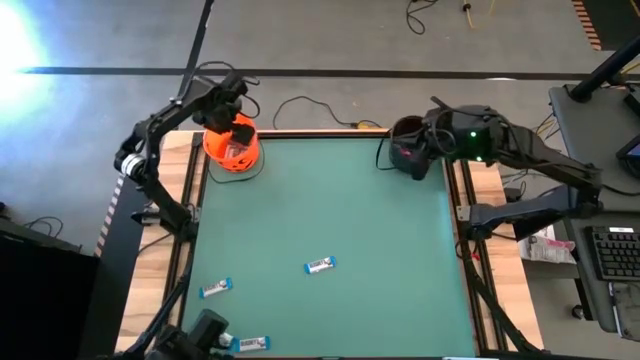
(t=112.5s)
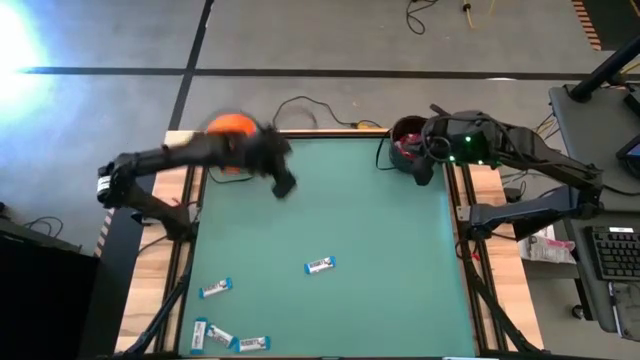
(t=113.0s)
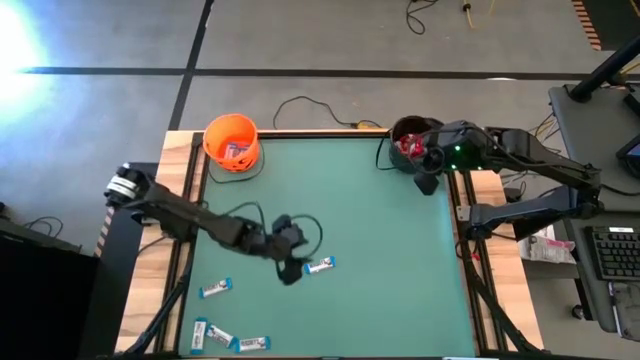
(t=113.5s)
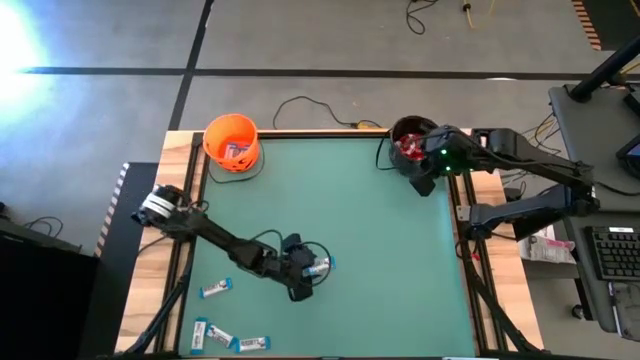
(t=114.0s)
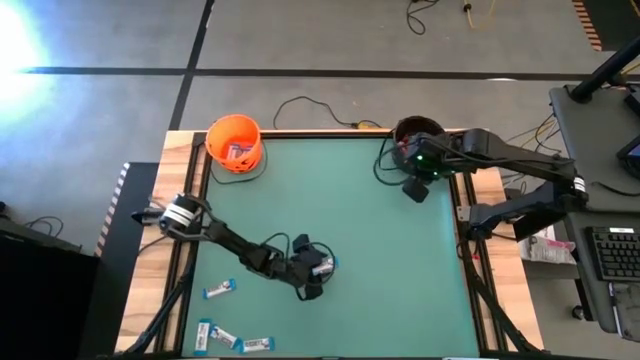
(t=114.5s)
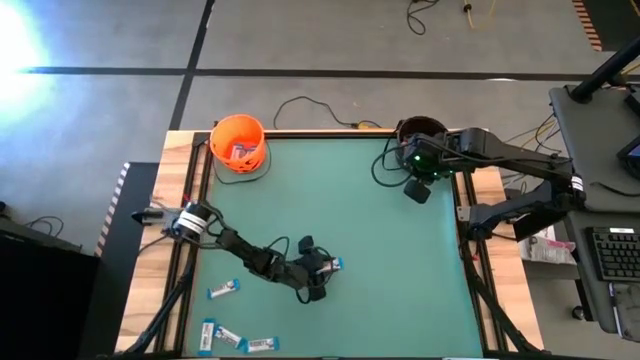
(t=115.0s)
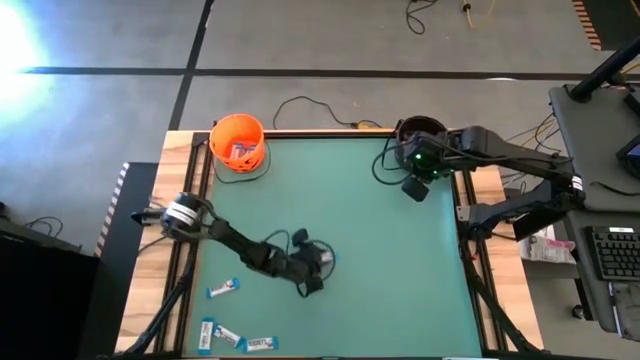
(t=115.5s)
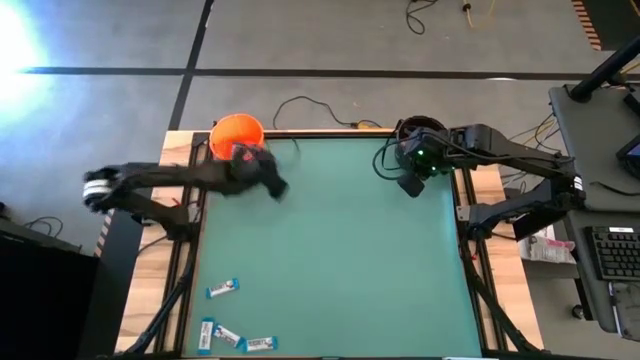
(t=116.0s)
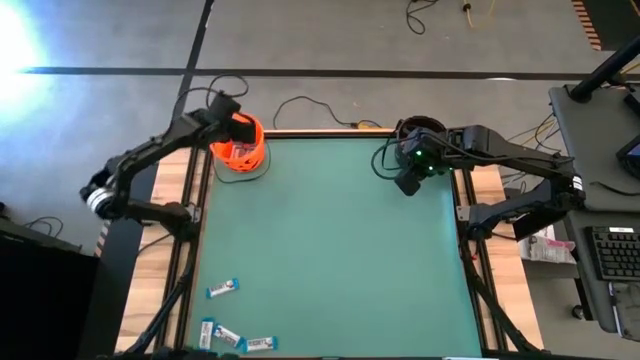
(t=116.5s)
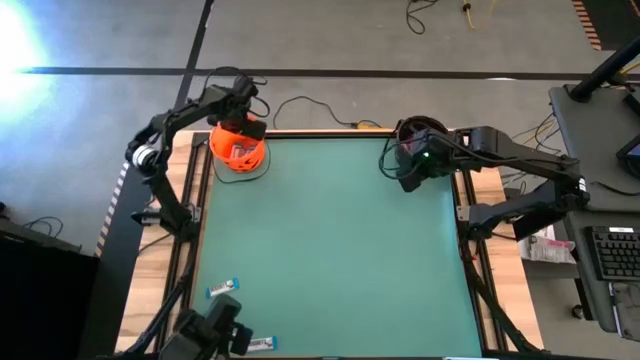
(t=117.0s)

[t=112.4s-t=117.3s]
Task: Sort candy by brand, put in halloween buckets
Put the white chocolate into the orange bucket

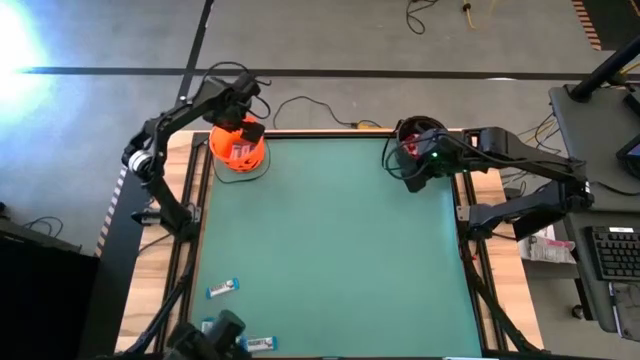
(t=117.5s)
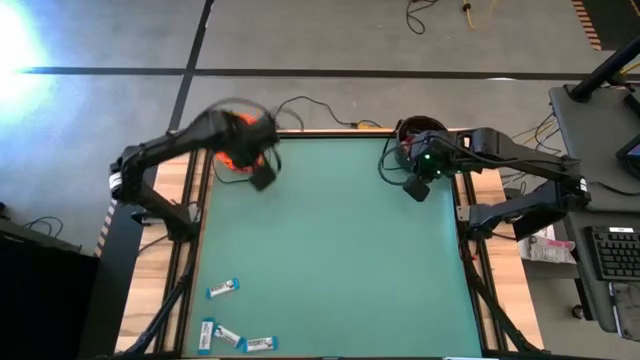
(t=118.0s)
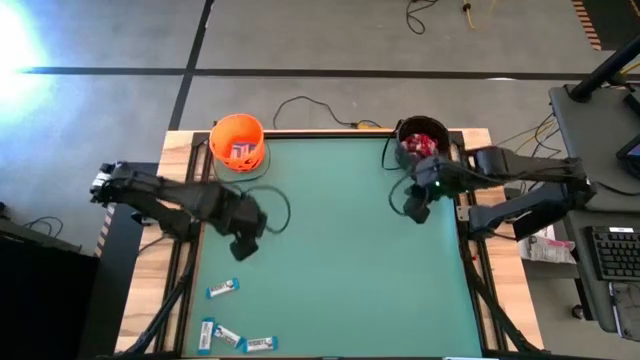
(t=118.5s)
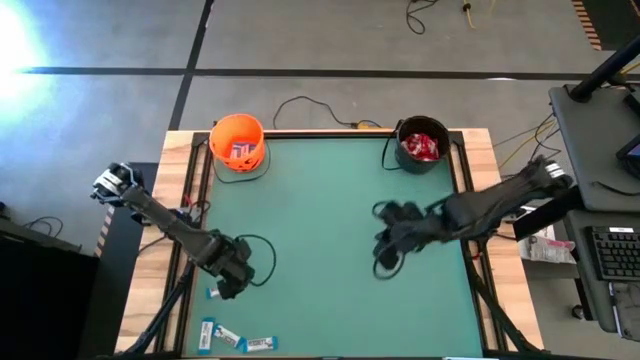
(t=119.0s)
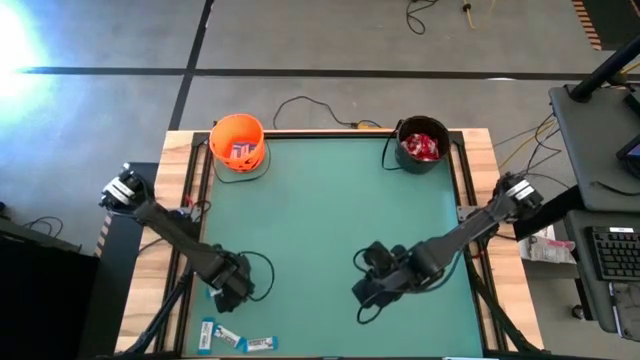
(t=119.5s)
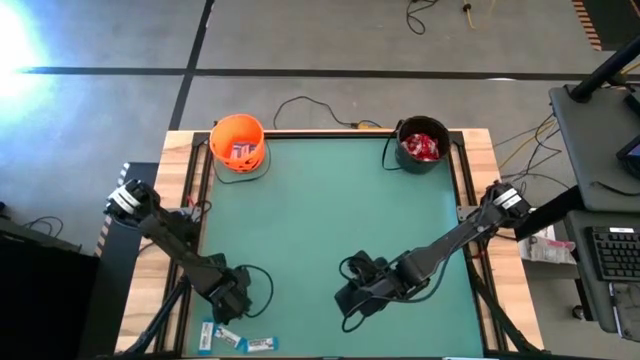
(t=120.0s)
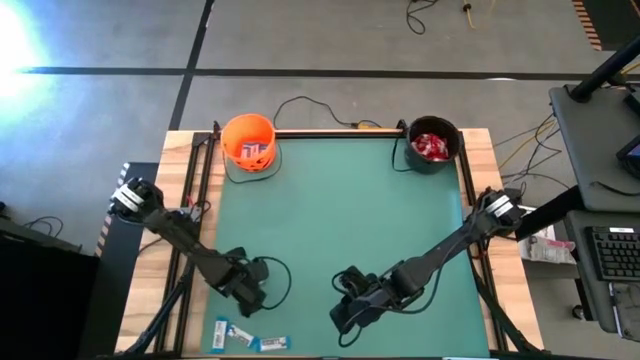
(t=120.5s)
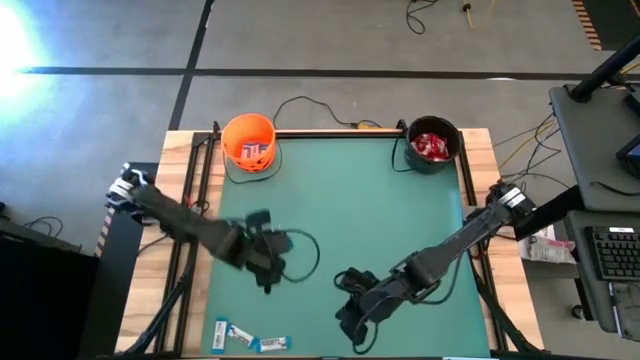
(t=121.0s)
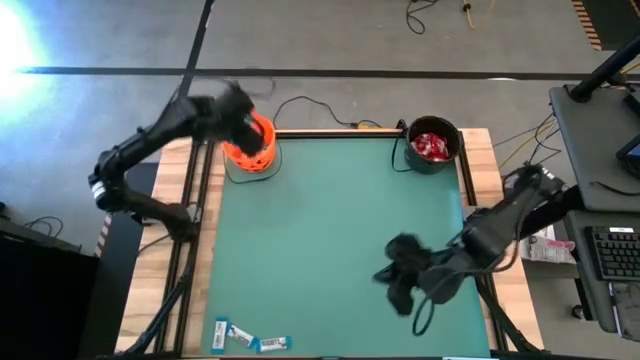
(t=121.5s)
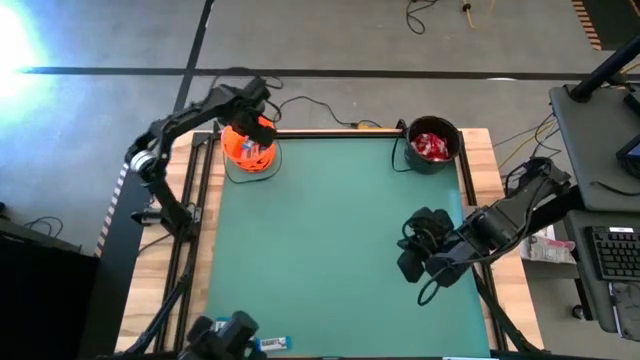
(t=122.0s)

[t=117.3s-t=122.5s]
Put the white chocolate into the orange bucket

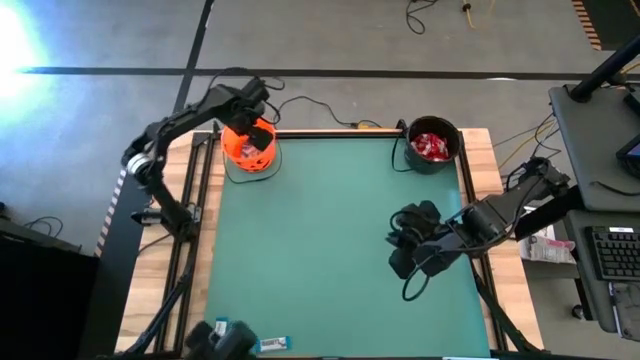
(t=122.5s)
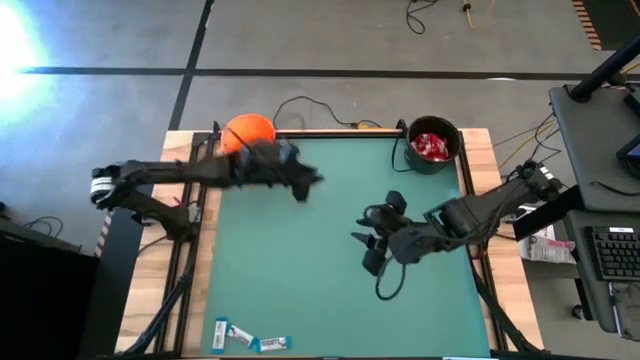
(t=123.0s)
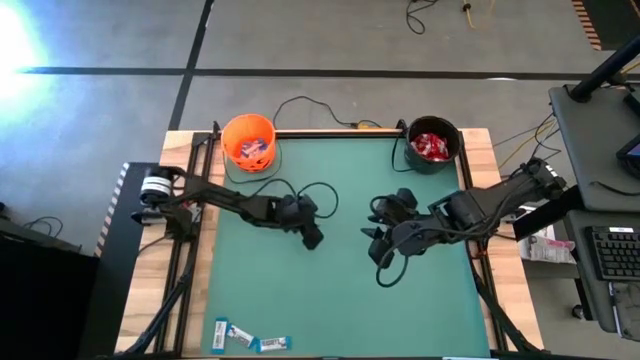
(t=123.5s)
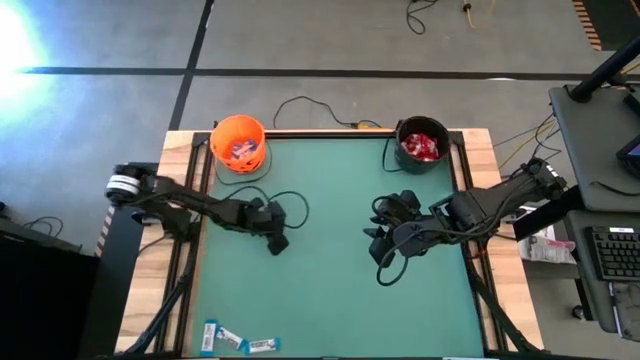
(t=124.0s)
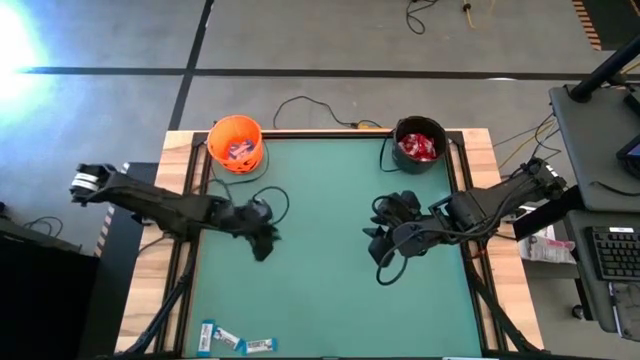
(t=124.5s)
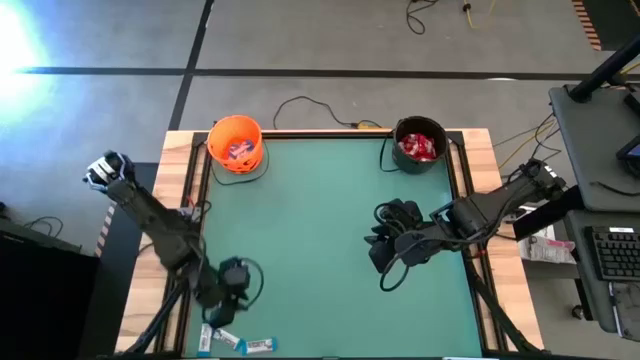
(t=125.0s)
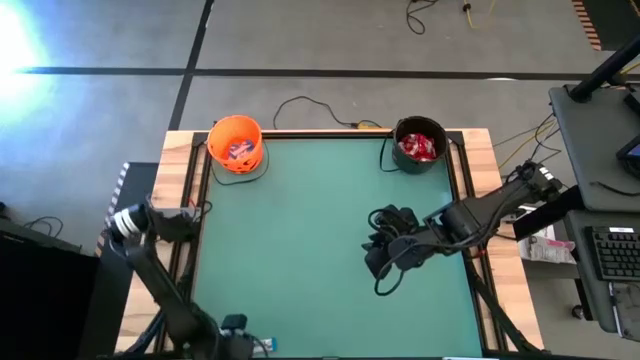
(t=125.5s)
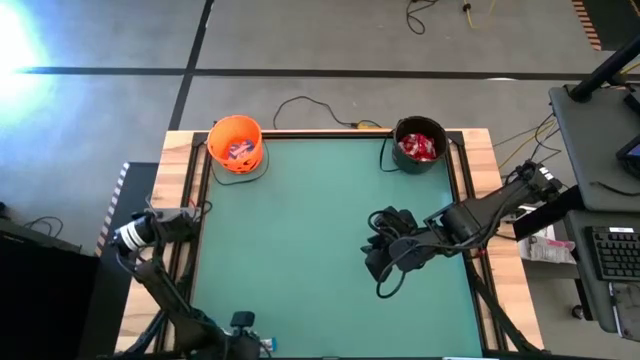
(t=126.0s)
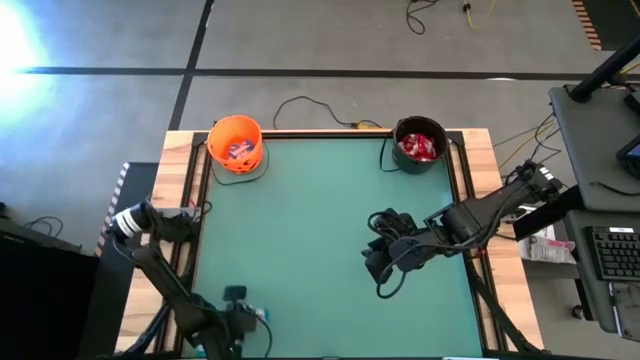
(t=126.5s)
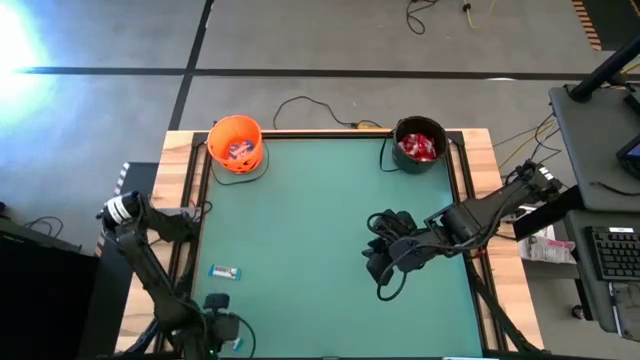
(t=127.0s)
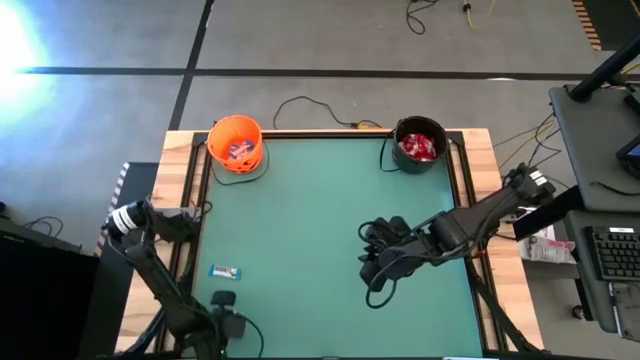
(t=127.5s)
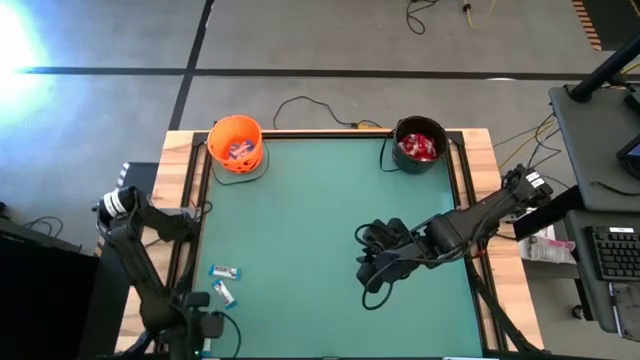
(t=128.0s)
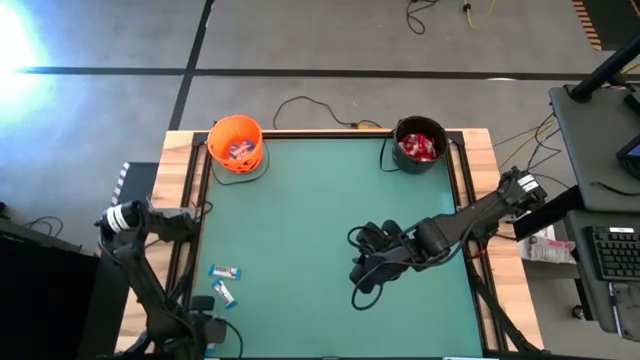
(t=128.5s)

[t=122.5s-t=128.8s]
Adjust the white candies

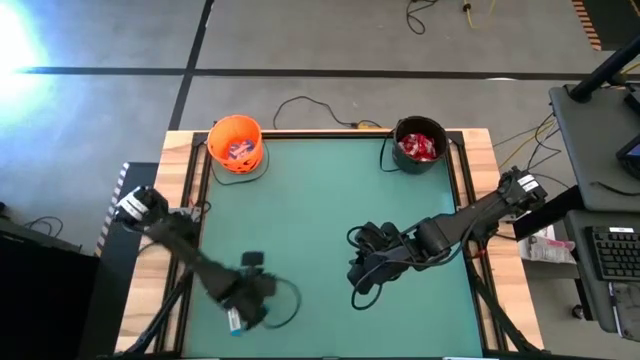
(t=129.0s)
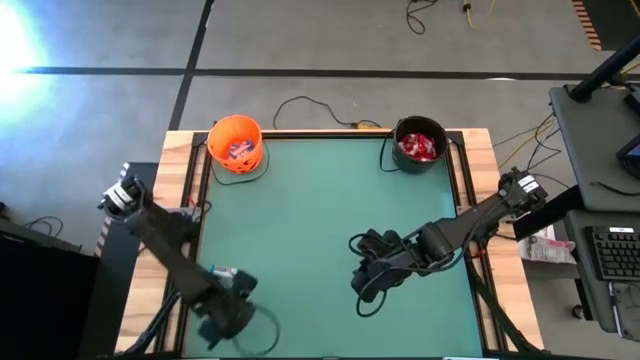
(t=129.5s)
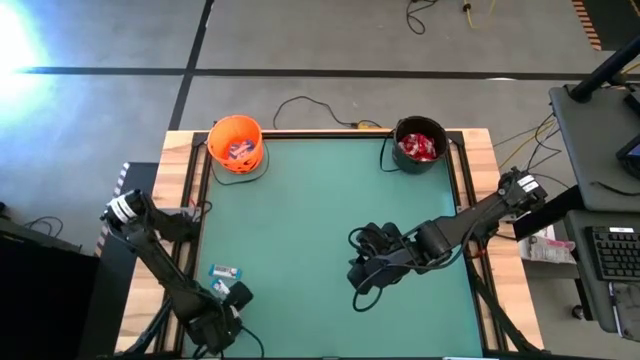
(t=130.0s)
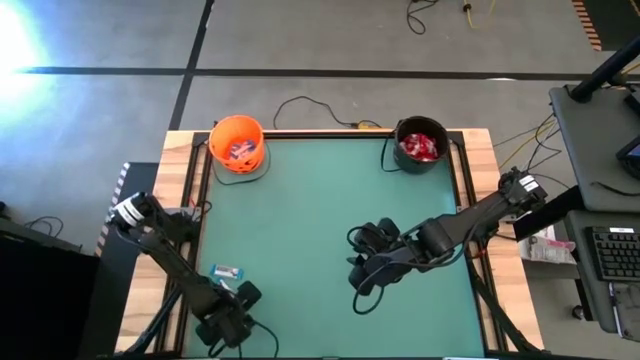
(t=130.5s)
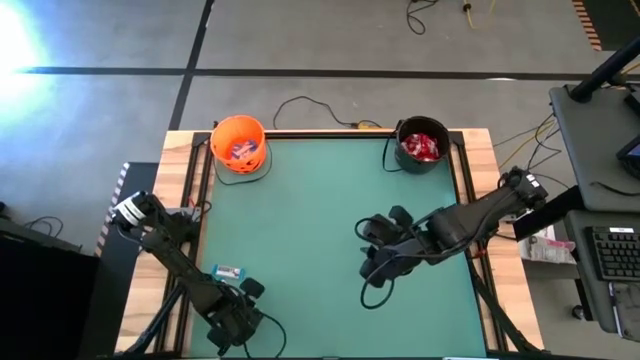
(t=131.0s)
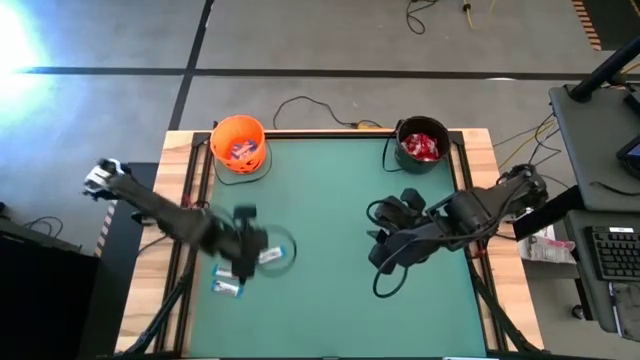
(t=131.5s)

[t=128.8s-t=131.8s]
Put the white chocolate into the orange bucket

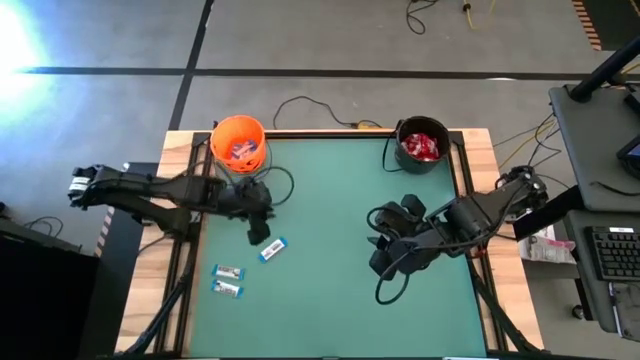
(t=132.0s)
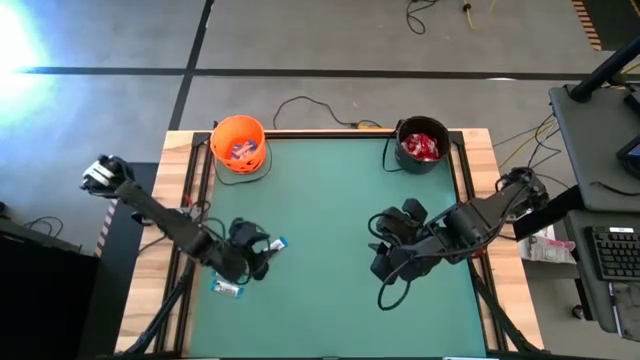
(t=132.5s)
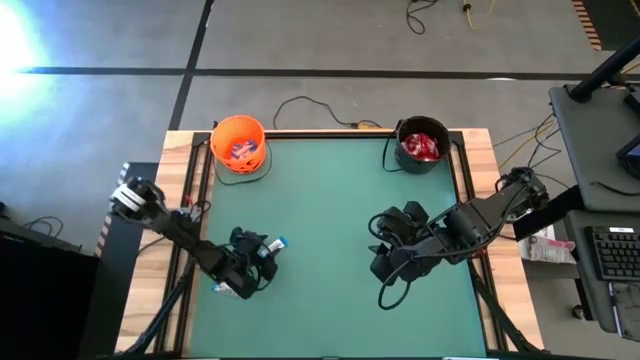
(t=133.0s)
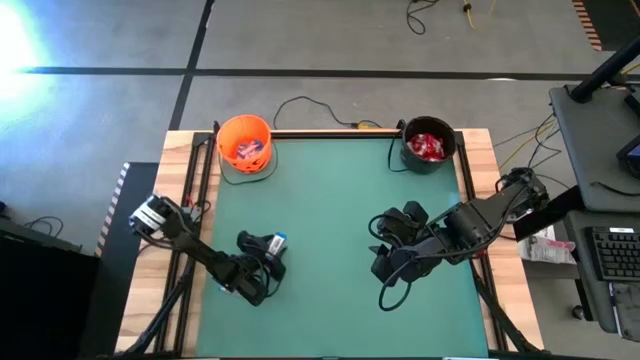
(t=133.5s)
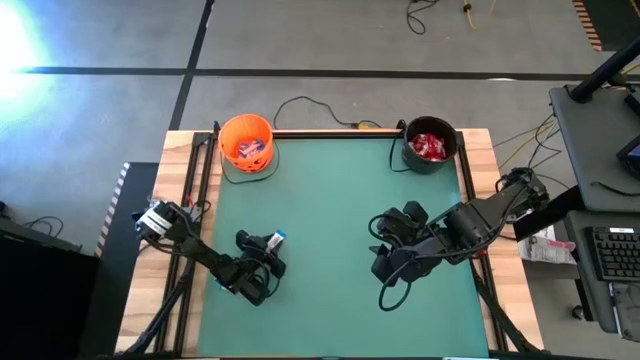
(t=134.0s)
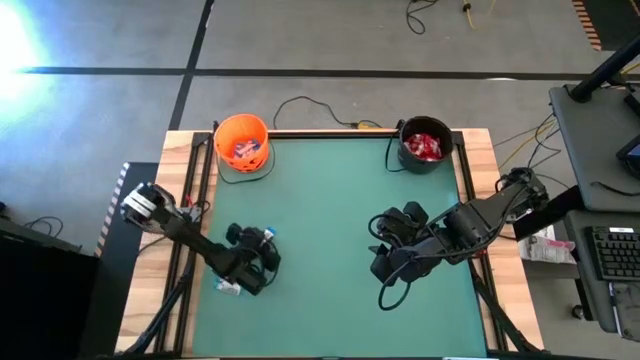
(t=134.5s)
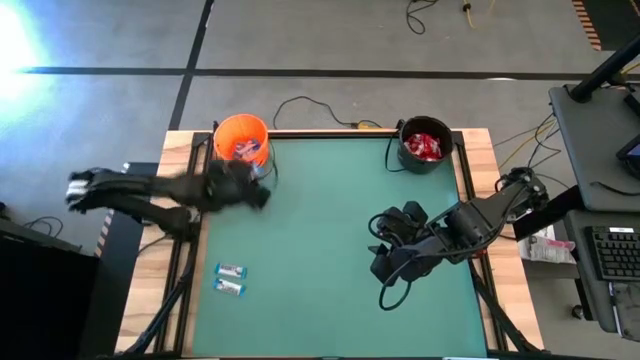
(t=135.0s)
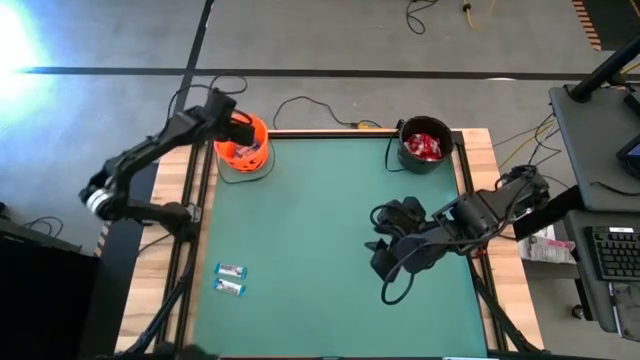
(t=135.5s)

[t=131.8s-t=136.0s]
Put the white chocolate into the orange bucket
